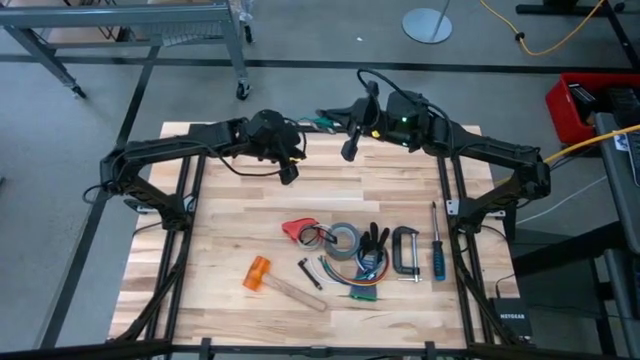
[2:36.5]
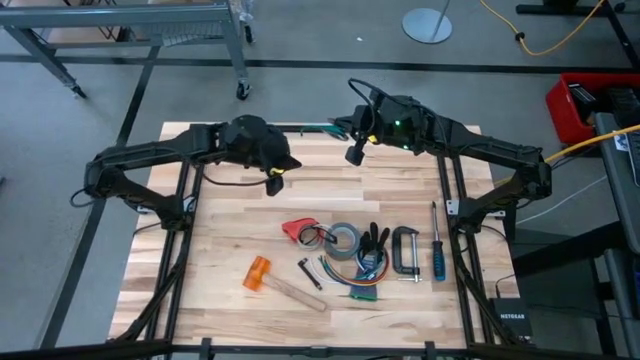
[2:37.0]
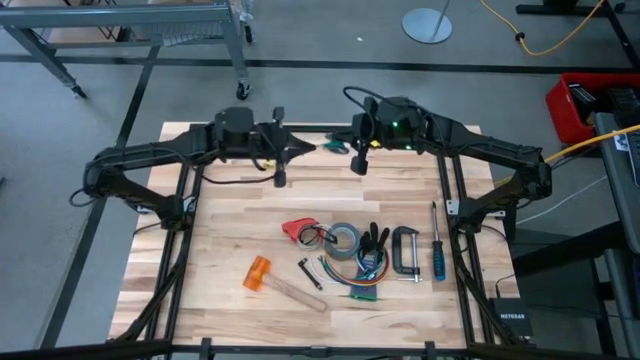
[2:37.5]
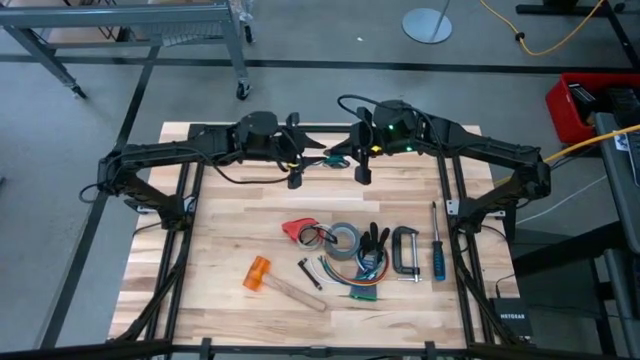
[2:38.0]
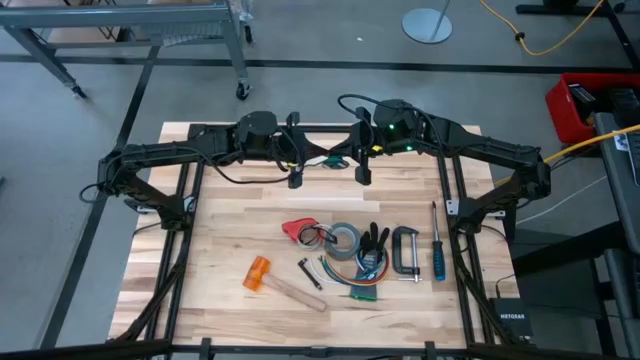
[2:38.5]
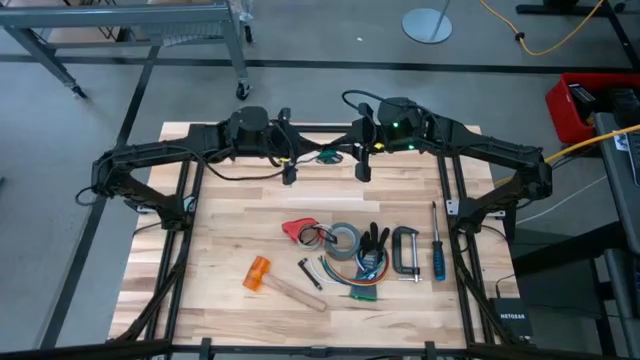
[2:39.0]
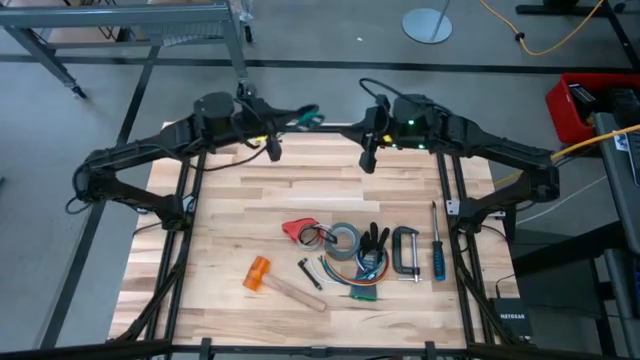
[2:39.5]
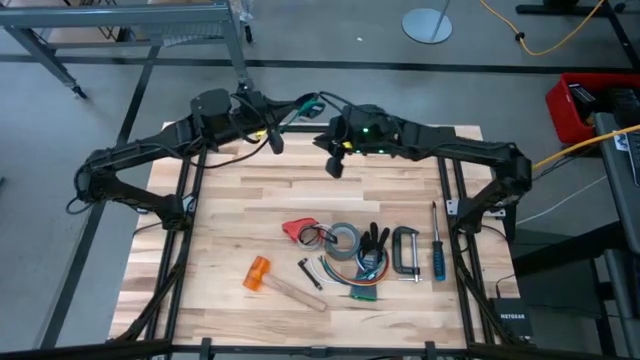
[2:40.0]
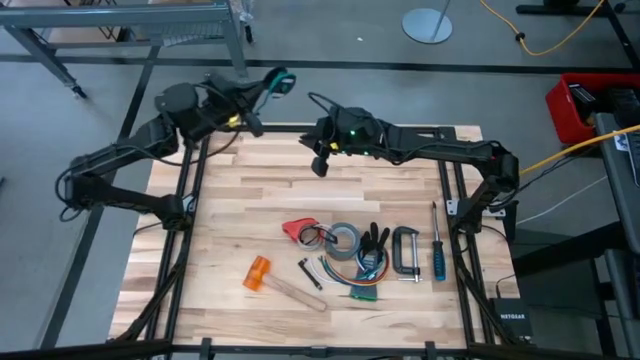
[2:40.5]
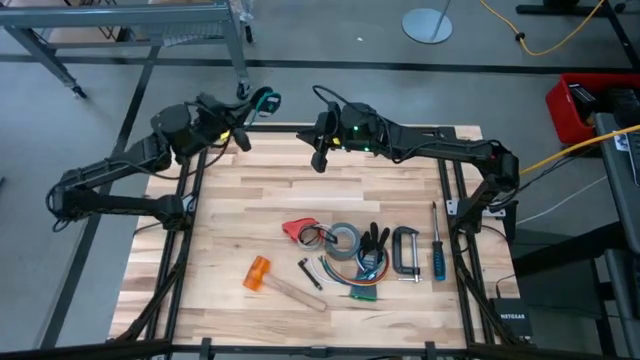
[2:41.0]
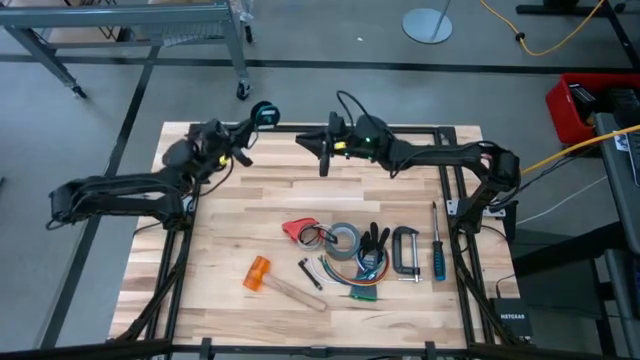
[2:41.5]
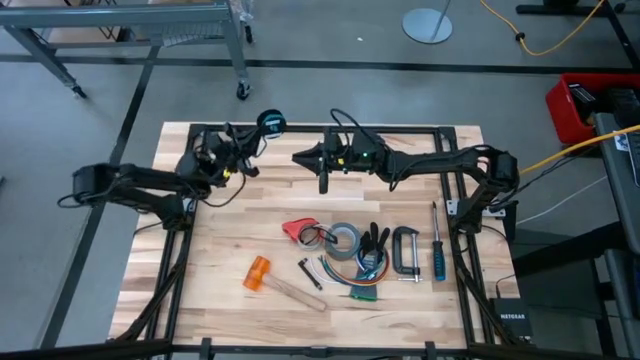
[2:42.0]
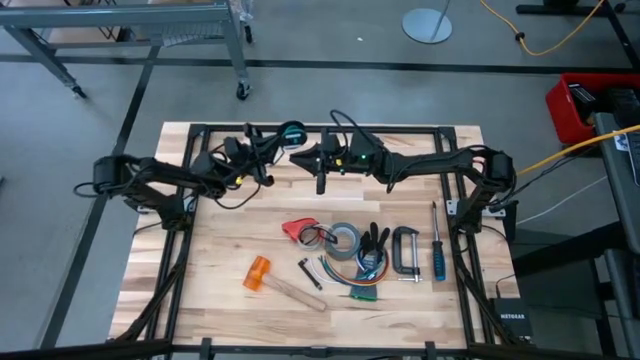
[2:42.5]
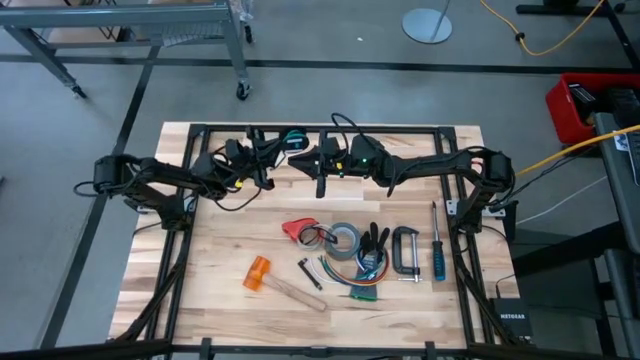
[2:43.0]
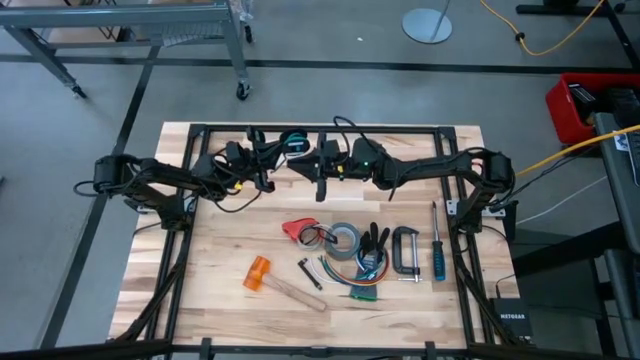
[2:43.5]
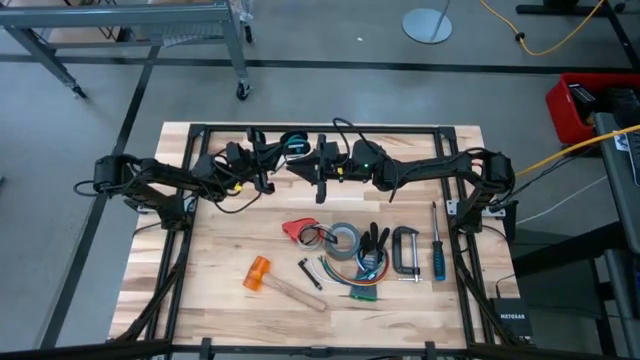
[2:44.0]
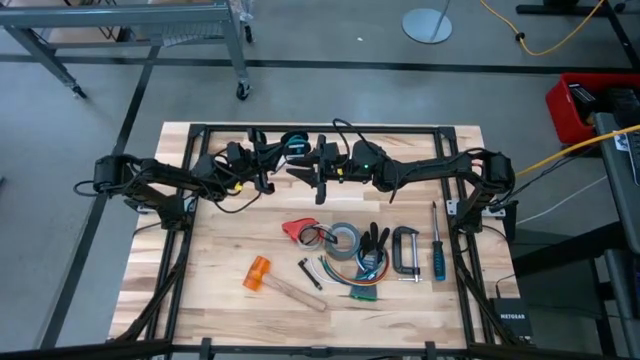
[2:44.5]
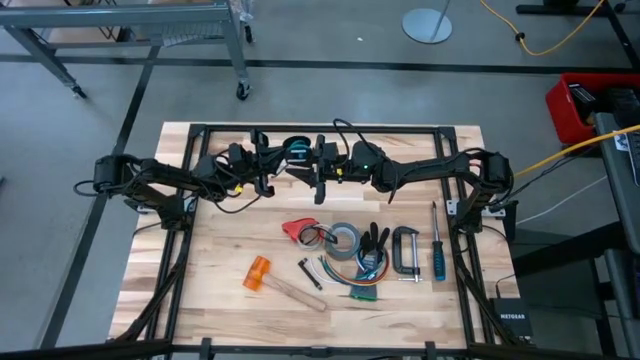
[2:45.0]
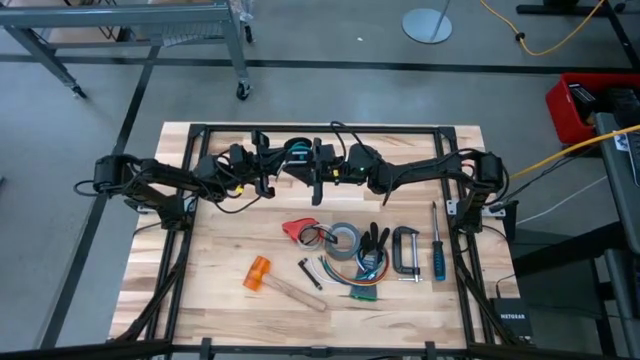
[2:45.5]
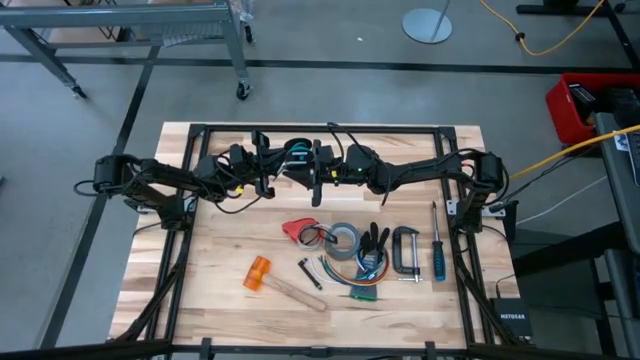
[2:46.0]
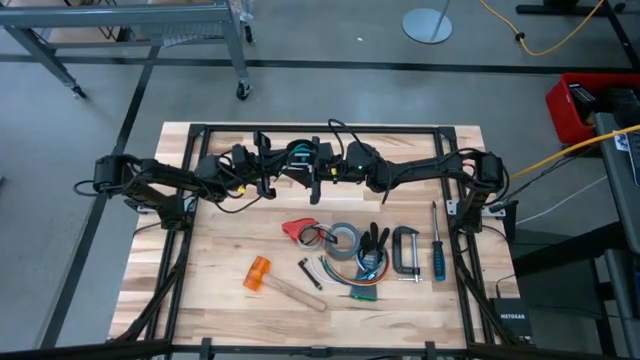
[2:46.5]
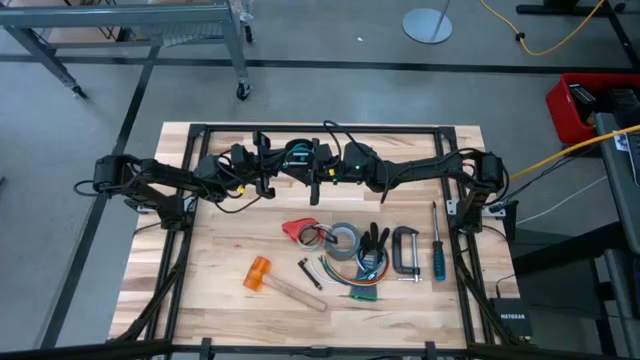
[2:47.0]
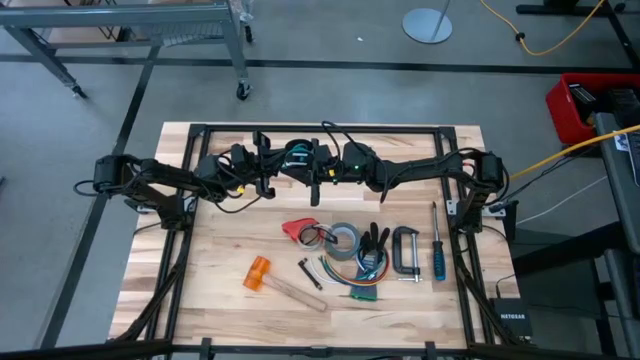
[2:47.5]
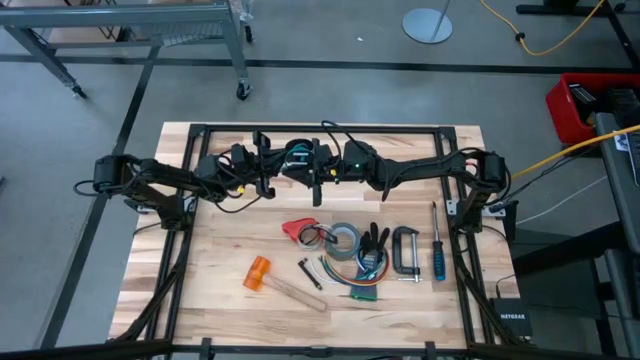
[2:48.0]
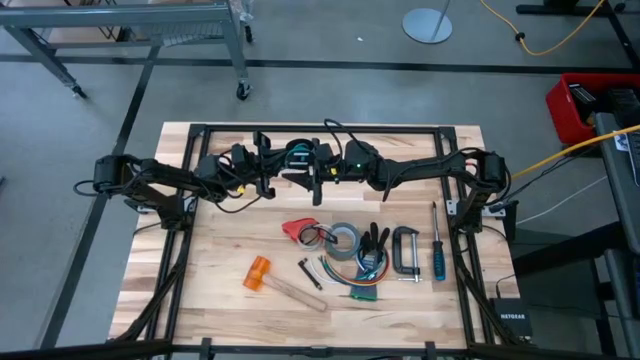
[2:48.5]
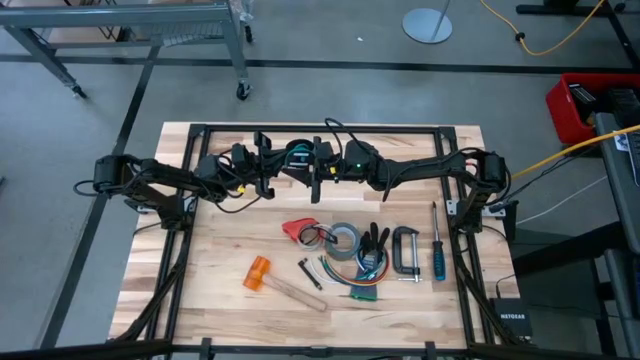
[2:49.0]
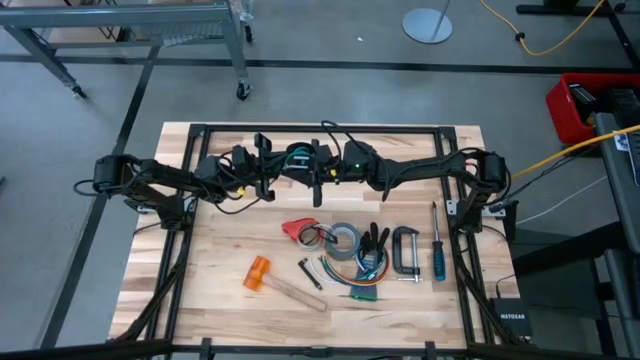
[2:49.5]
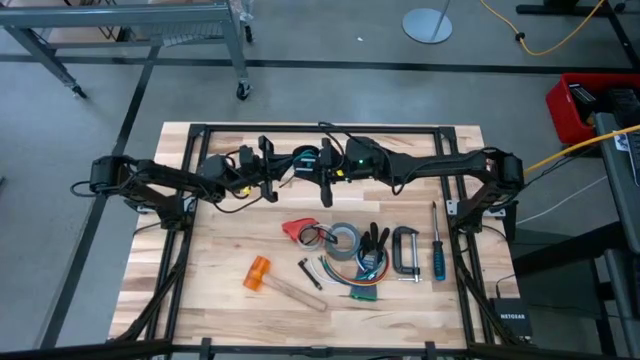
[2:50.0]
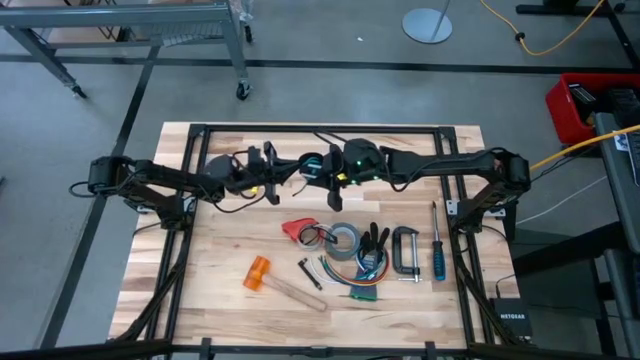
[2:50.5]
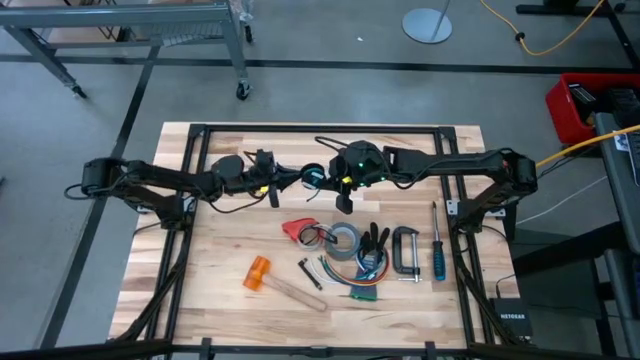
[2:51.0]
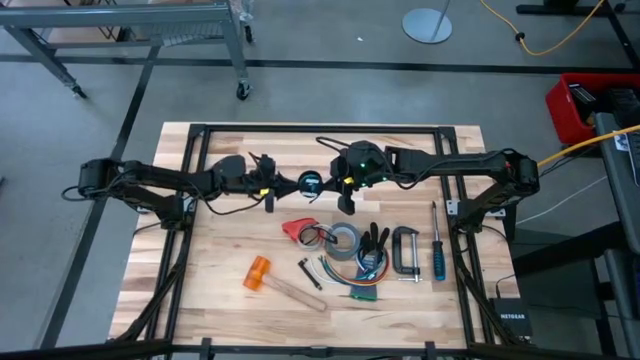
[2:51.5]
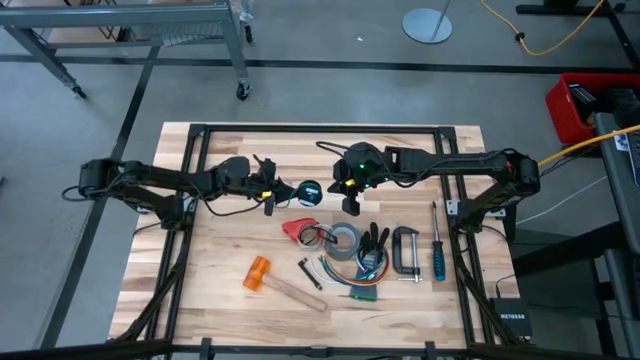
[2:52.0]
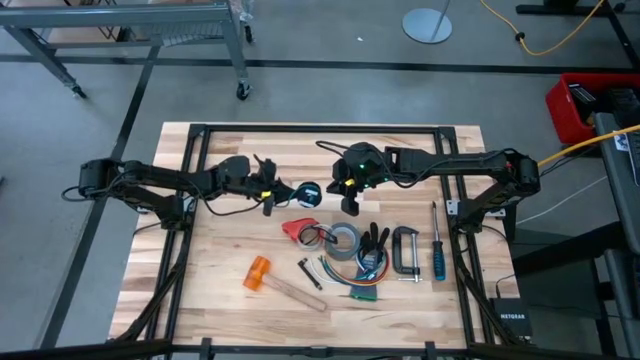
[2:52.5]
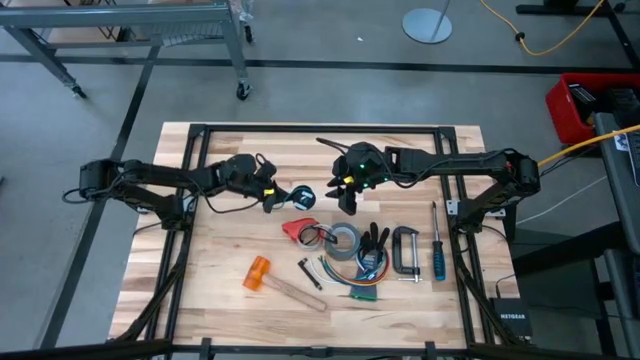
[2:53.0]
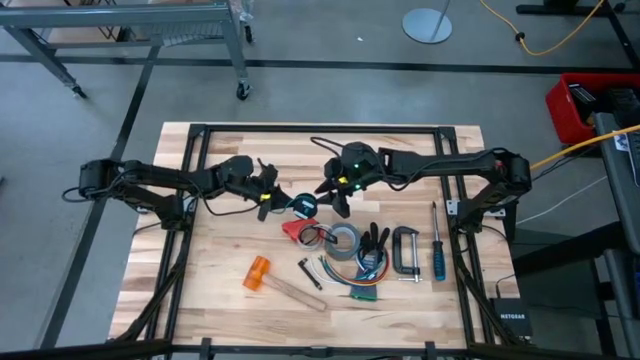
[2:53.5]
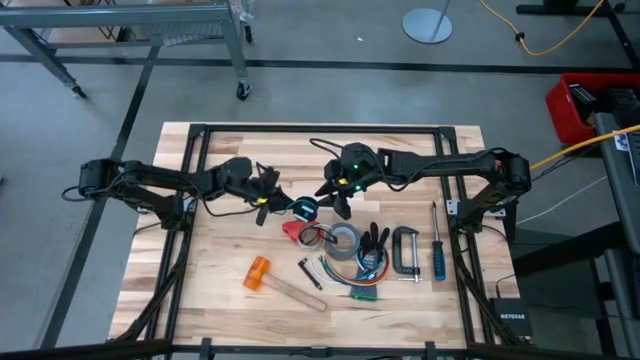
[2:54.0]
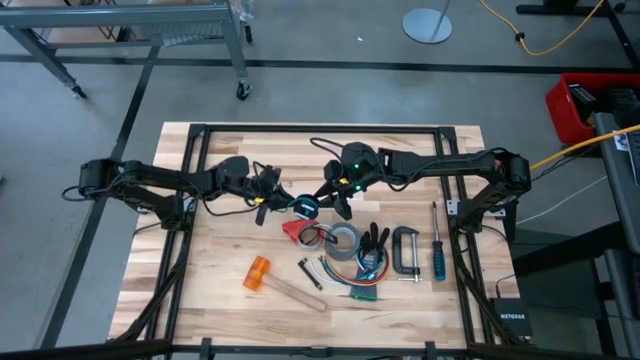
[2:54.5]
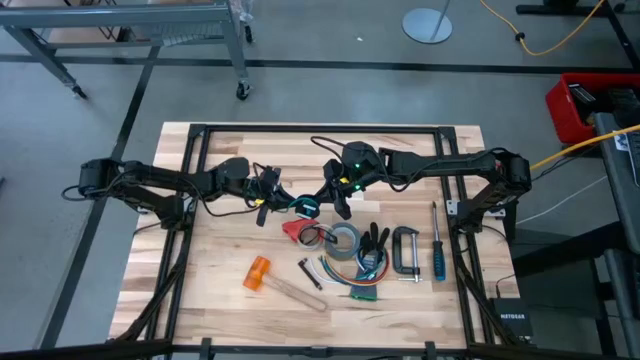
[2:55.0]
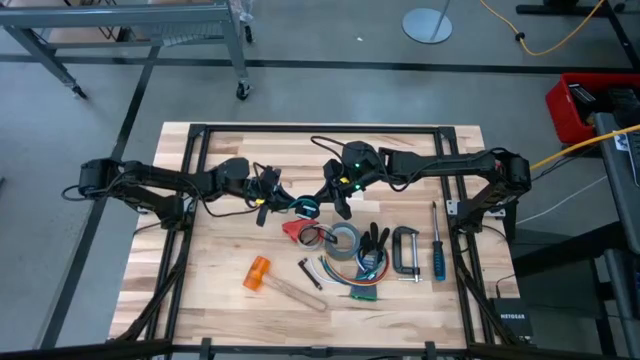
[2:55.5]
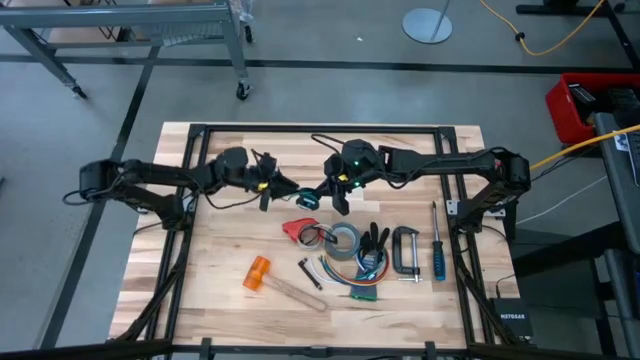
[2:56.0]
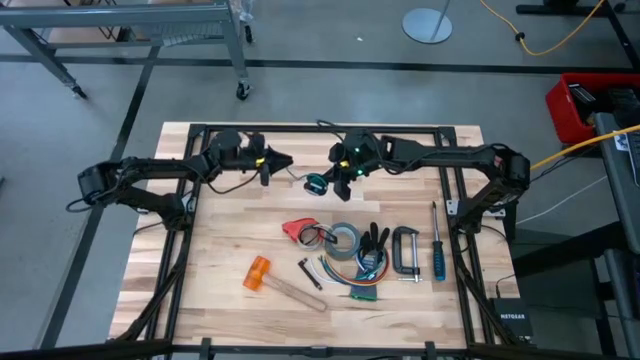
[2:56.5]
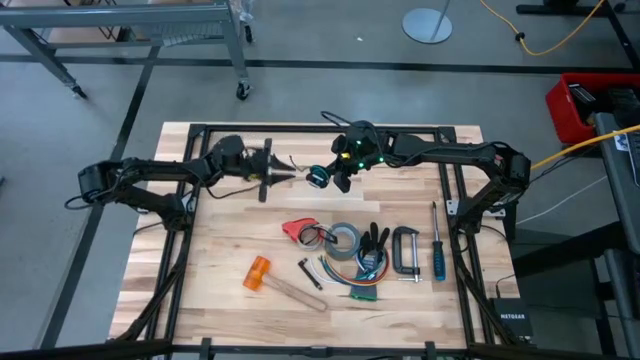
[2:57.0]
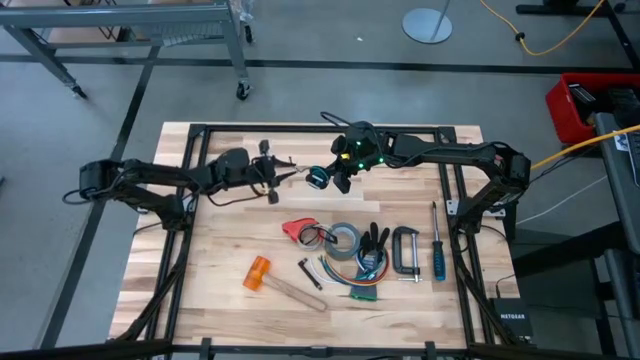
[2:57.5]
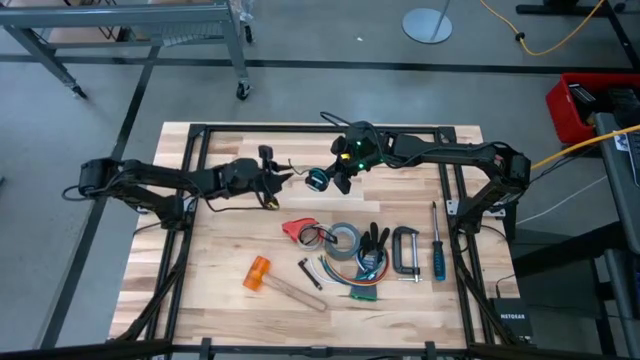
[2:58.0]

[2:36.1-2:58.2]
Task: Coil cords
Coil the green cable wire on the black spool

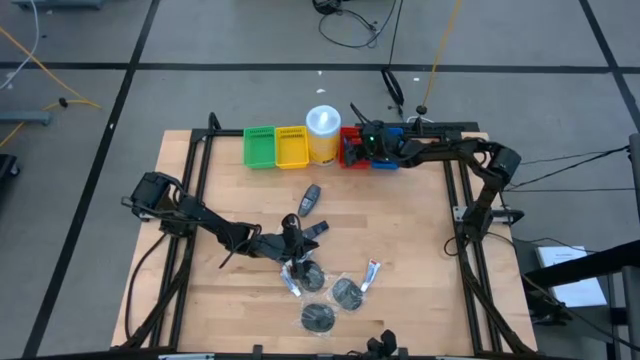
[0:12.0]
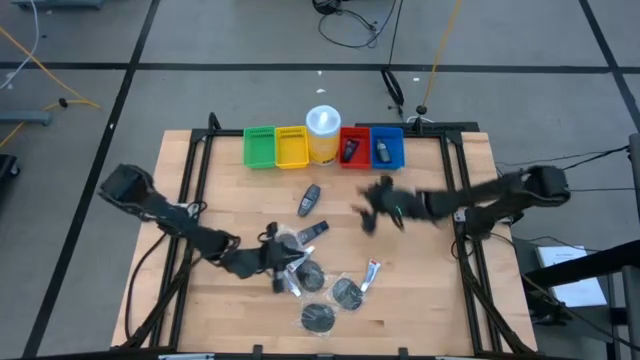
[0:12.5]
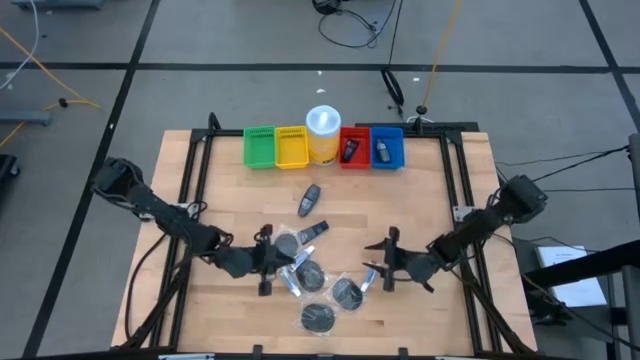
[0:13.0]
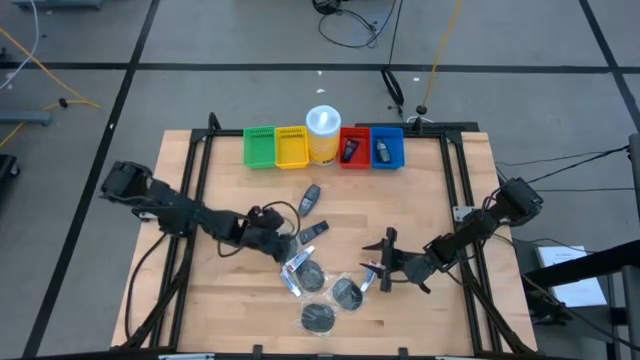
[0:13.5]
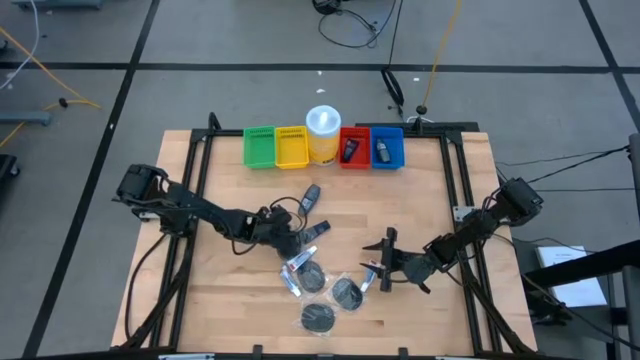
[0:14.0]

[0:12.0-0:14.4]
Task: Pick & Place Travel size toiletries
Put the black hairbrush into the yellow basket
